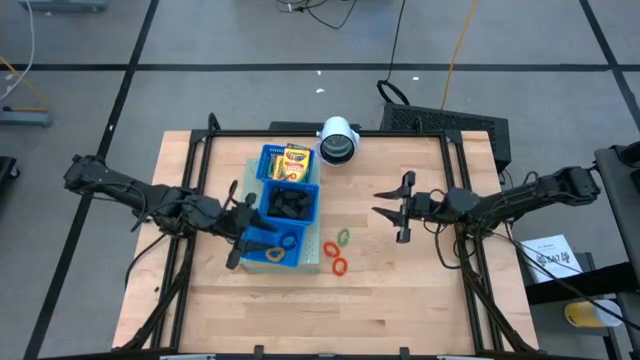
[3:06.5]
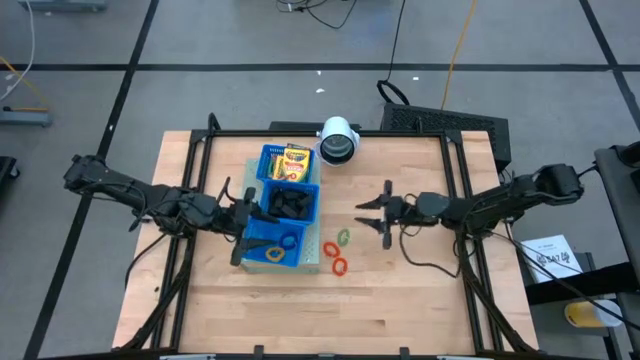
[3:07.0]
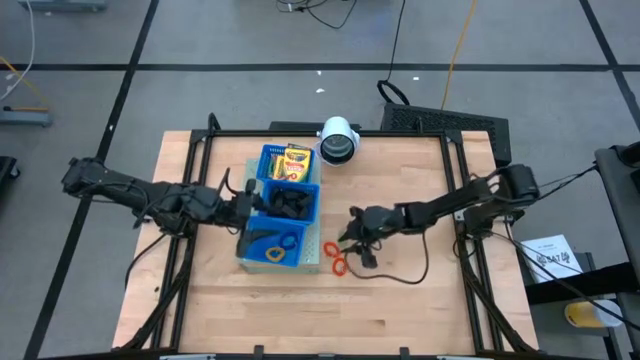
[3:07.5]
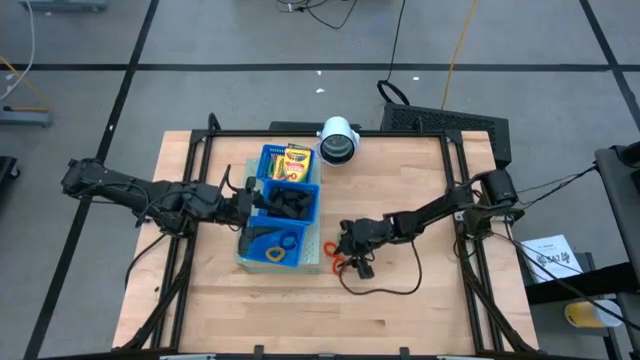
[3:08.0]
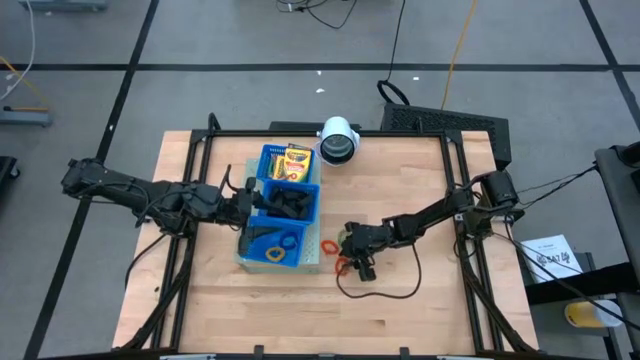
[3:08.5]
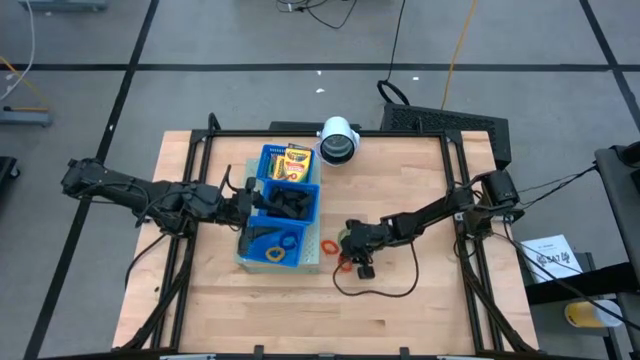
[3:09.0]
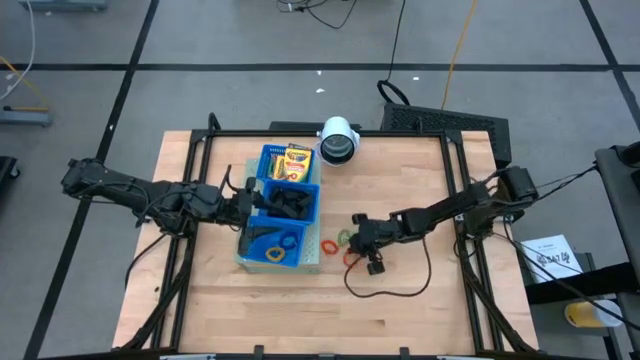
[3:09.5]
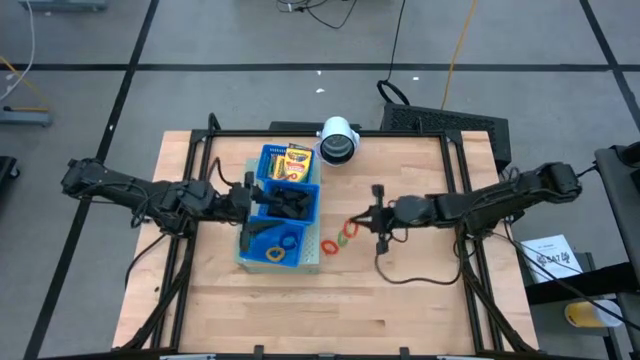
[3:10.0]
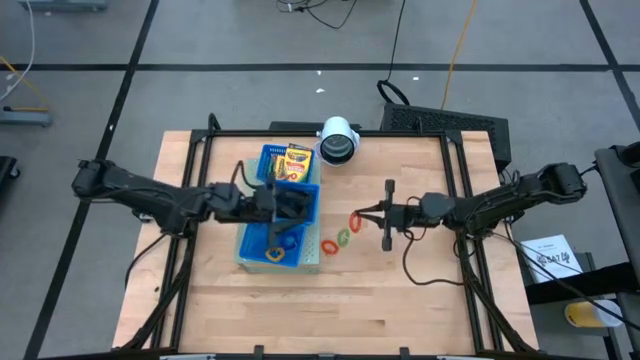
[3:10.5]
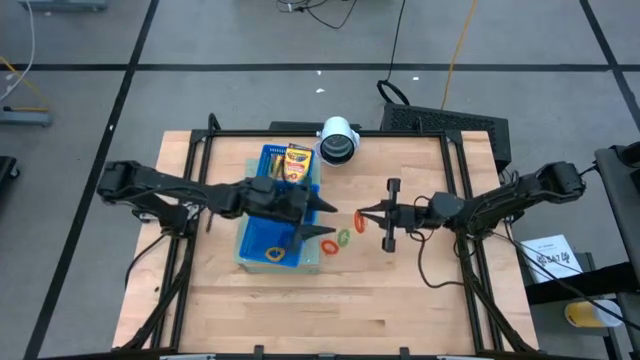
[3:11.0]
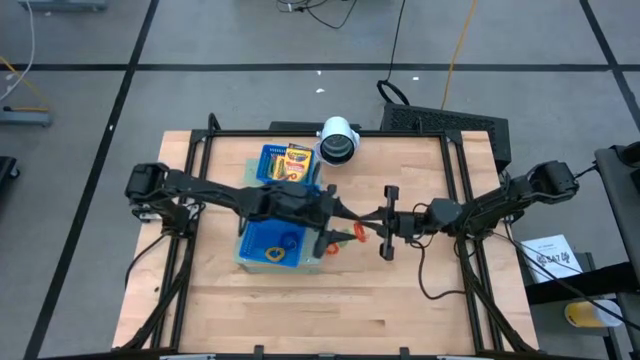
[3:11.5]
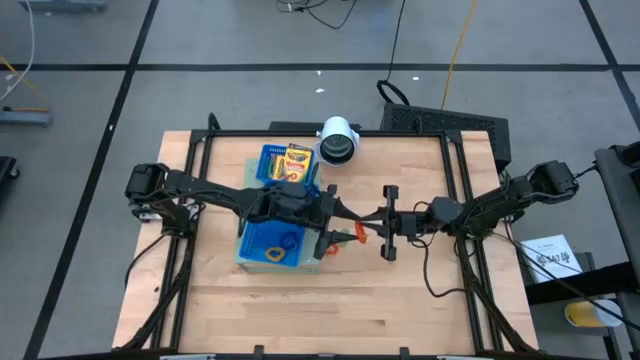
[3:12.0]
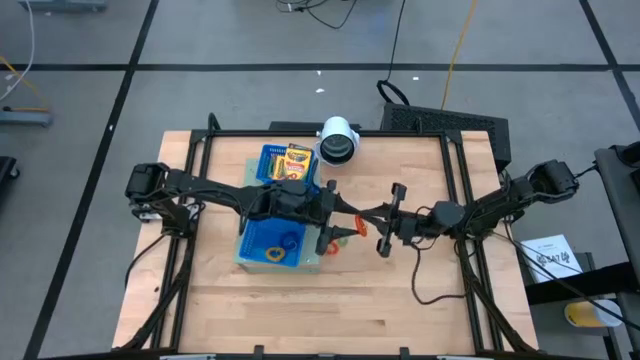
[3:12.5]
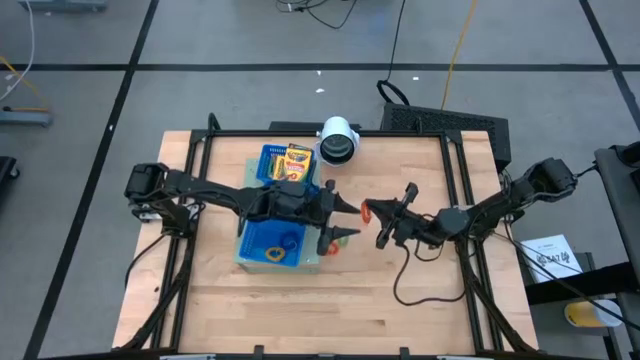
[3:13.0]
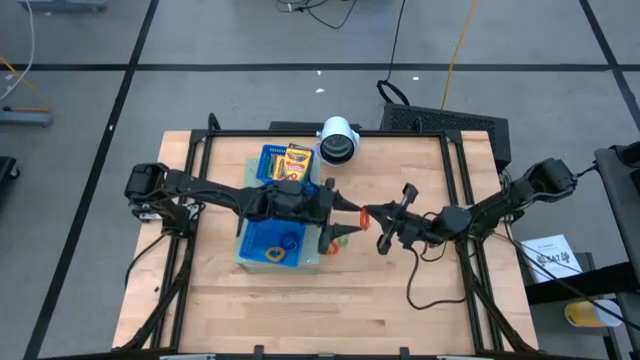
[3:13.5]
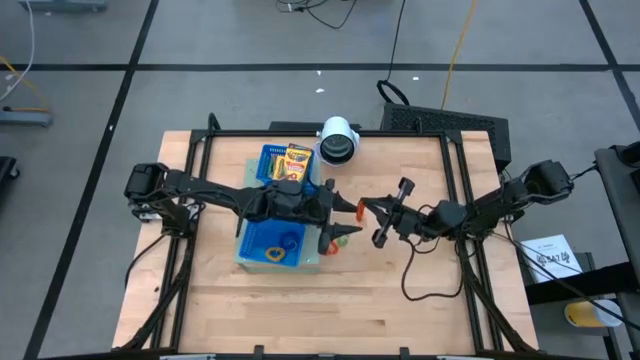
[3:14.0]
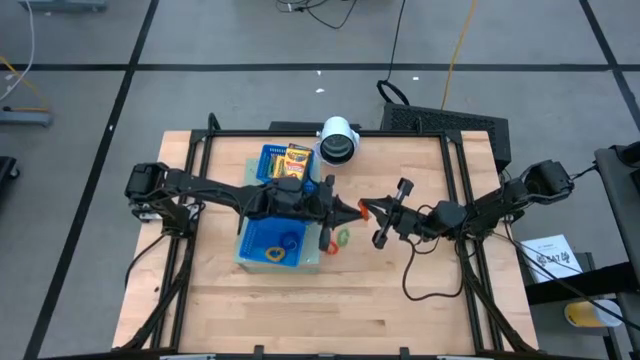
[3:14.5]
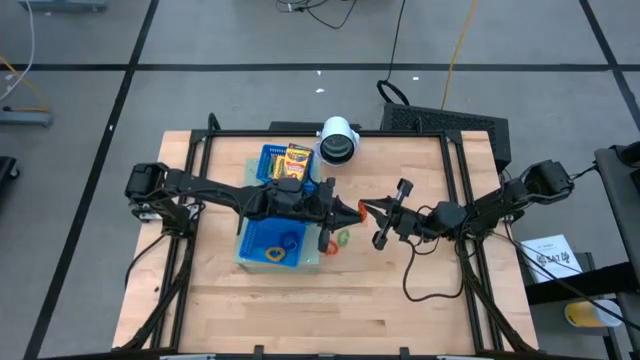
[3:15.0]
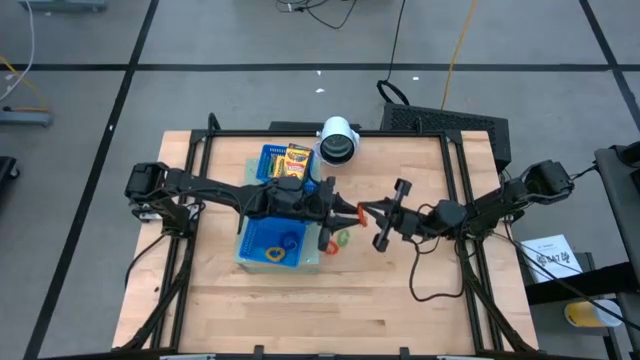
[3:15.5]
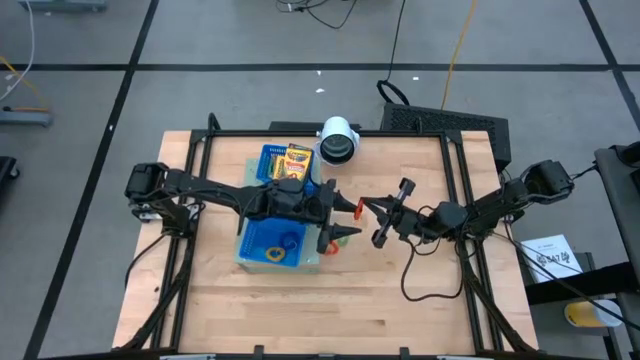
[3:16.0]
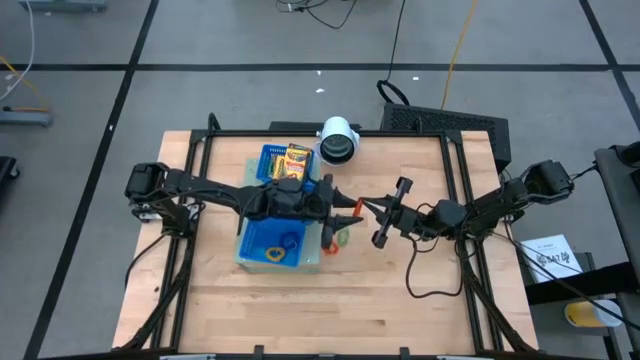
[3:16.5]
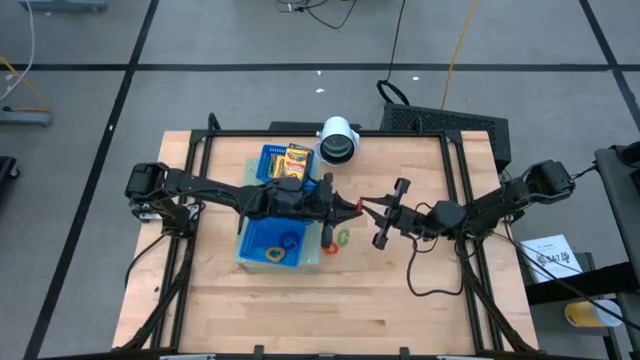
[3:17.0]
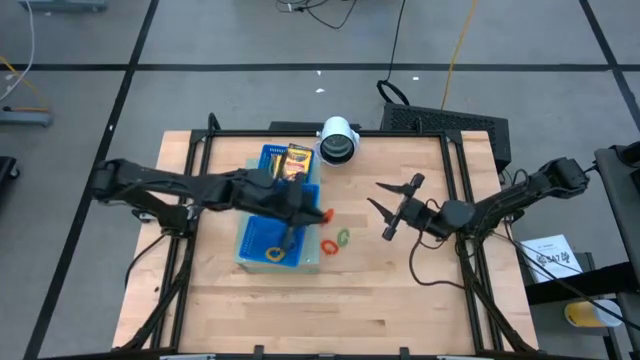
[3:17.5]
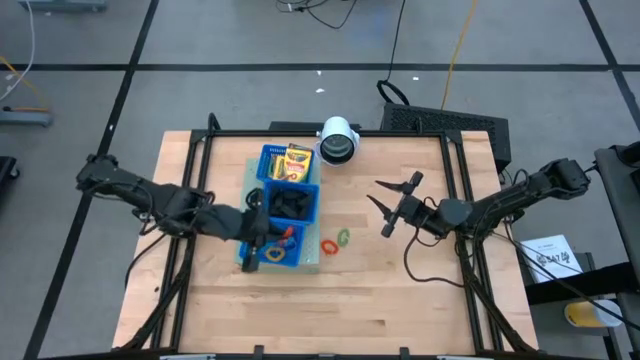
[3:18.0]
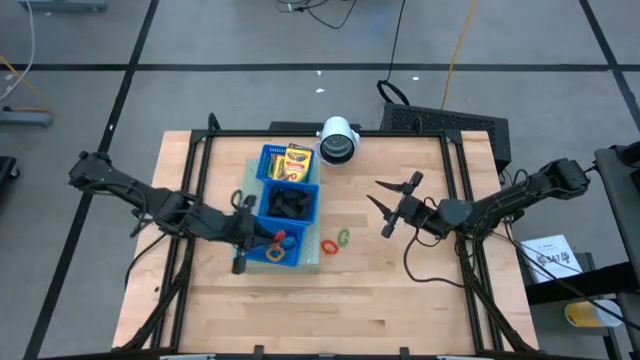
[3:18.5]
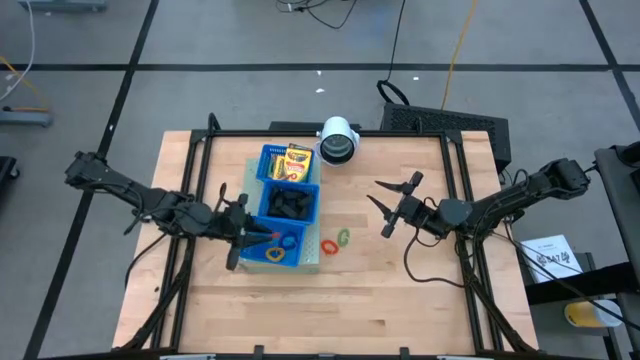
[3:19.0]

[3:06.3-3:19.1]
Task: Pick & Place Office Desk Supplies
Put the orange spring rubber band into the bottom blue bin on the shelf

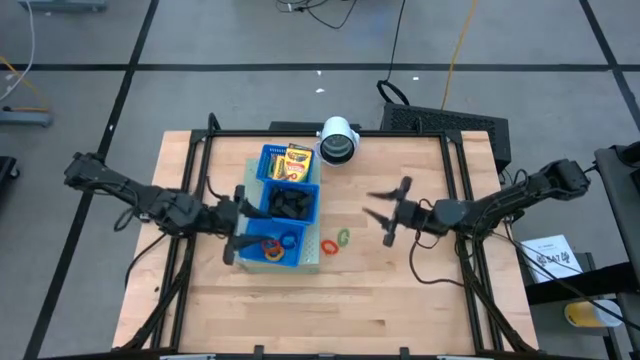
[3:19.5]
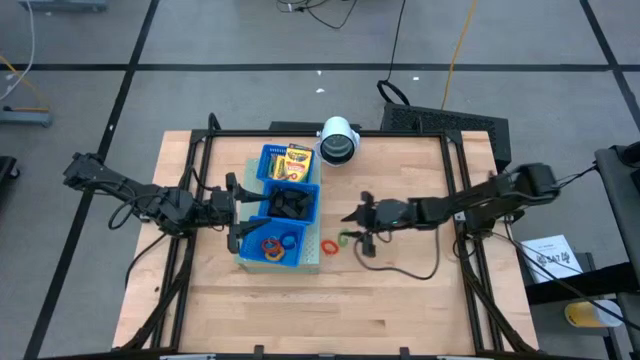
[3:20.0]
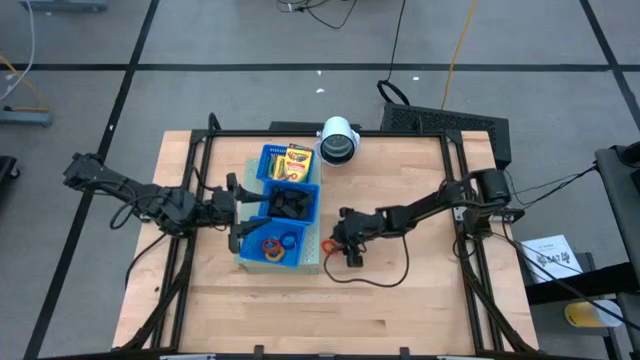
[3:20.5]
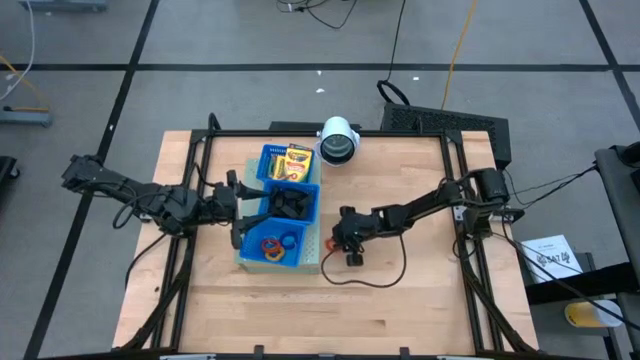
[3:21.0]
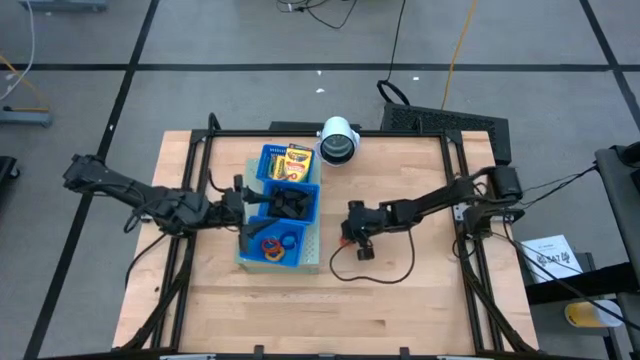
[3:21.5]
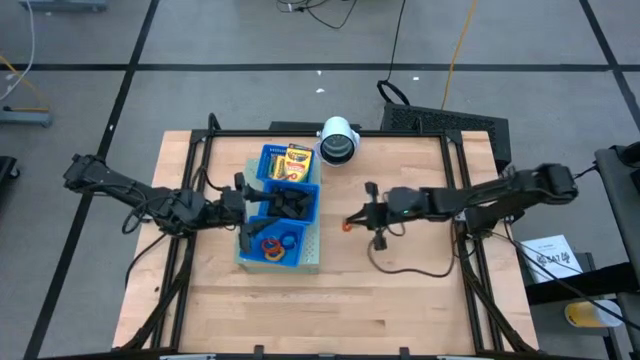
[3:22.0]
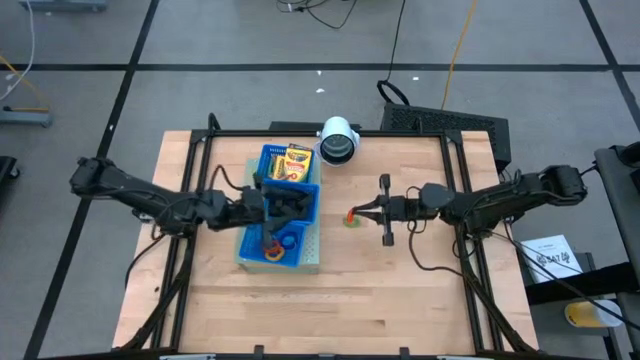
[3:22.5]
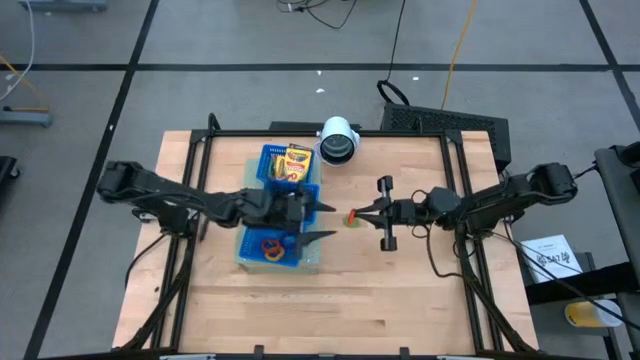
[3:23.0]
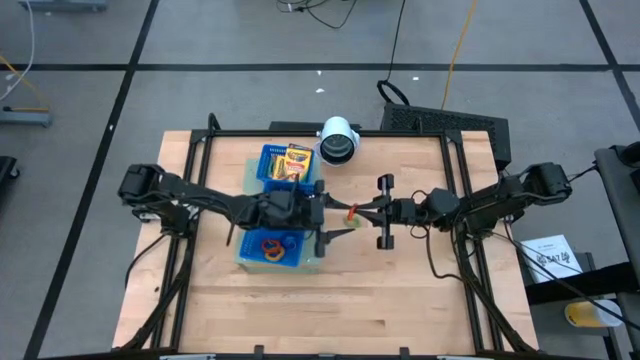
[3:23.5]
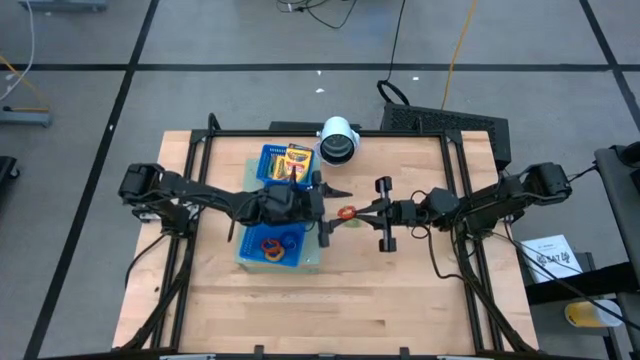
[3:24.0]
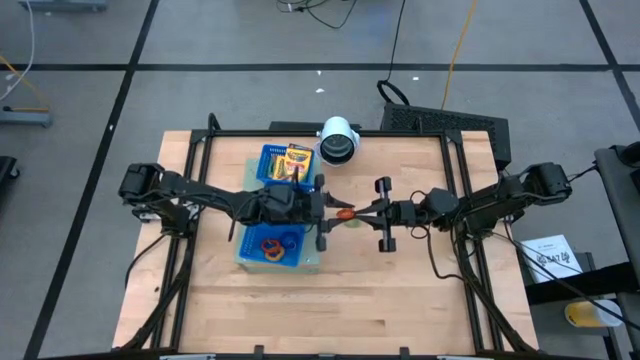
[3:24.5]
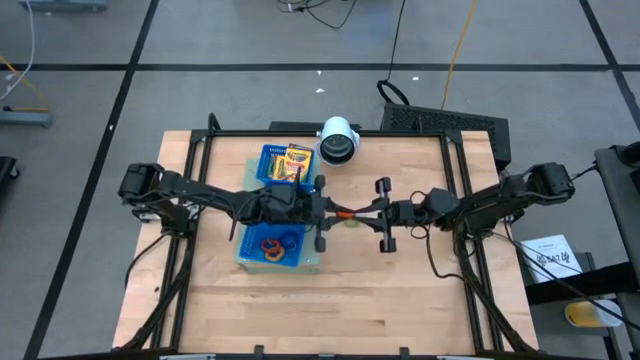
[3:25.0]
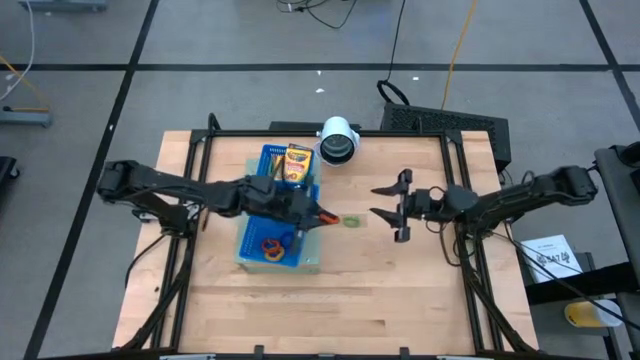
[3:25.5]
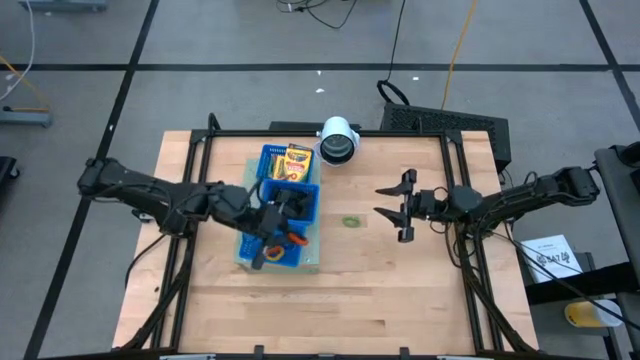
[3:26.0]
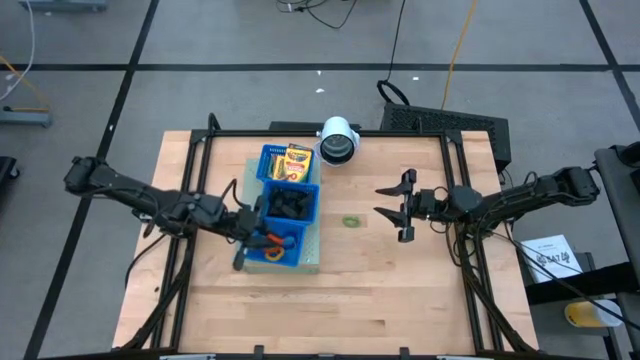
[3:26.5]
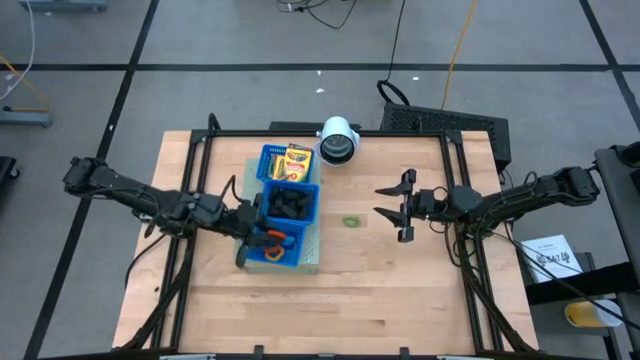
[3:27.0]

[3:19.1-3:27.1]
Put the orange rubber band into the bottom blue bin on the shelf
